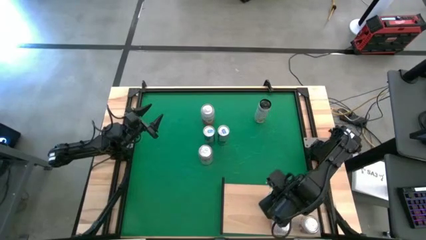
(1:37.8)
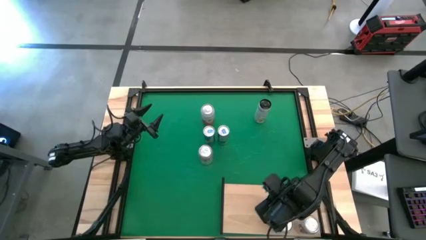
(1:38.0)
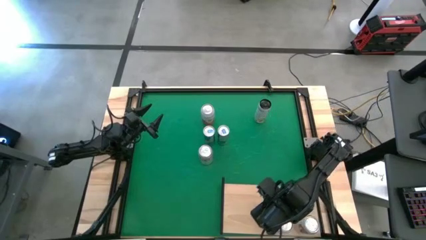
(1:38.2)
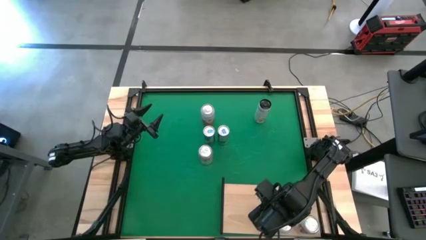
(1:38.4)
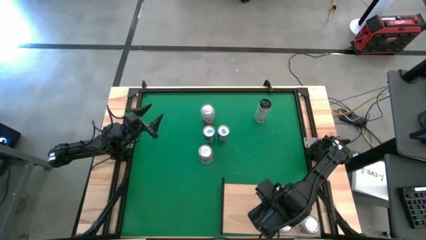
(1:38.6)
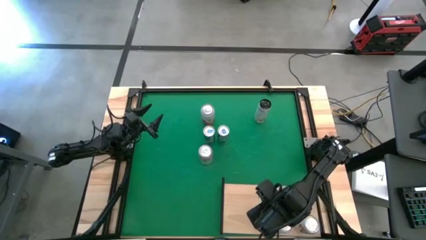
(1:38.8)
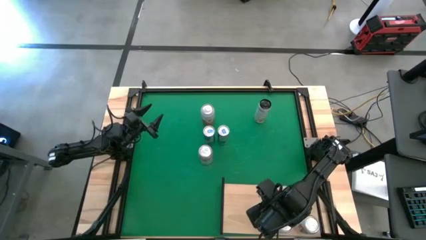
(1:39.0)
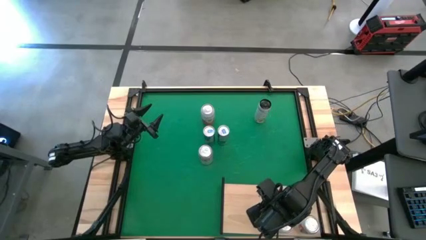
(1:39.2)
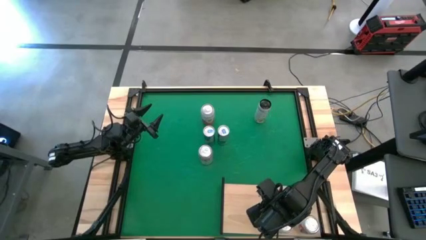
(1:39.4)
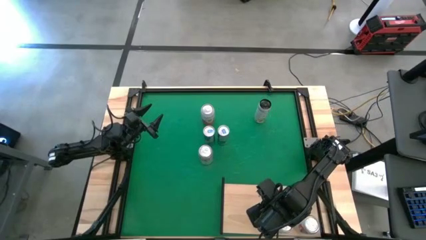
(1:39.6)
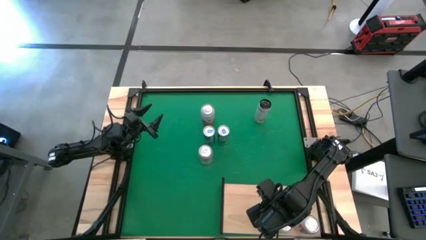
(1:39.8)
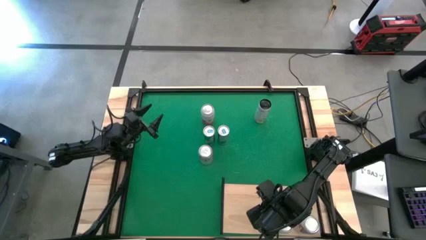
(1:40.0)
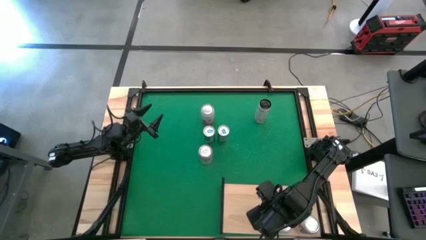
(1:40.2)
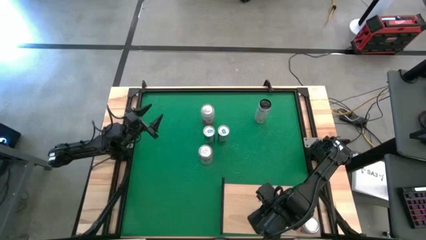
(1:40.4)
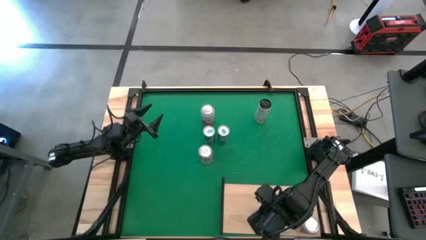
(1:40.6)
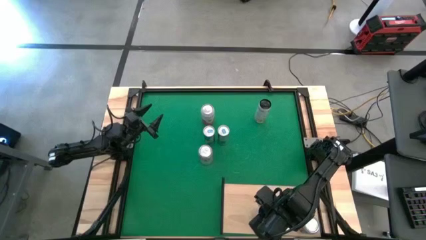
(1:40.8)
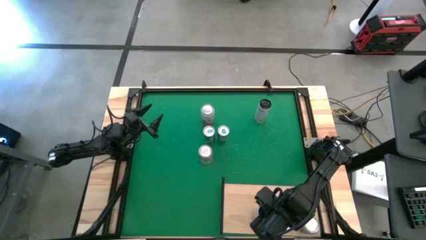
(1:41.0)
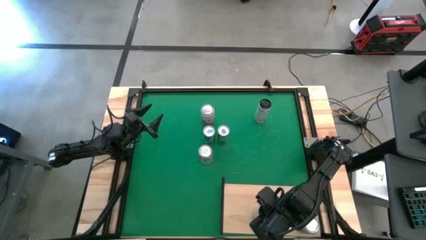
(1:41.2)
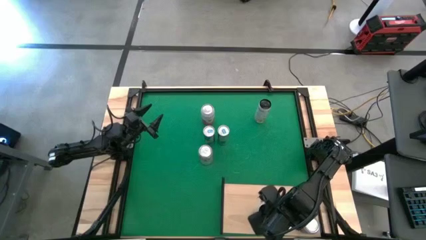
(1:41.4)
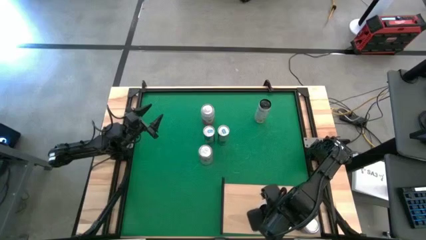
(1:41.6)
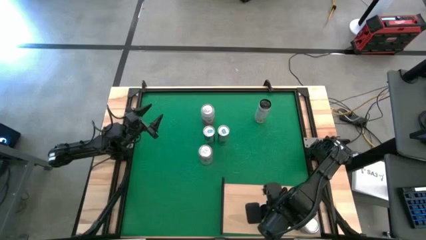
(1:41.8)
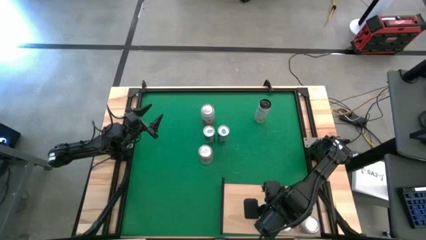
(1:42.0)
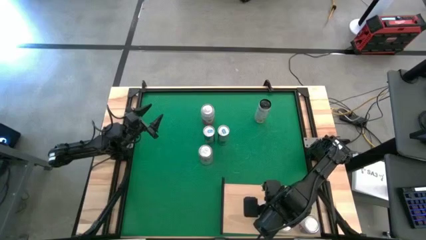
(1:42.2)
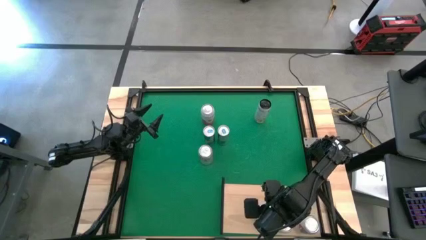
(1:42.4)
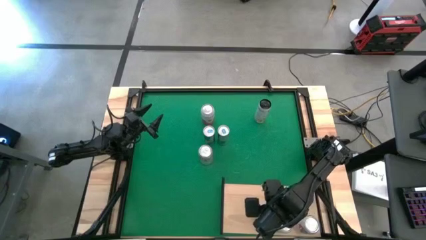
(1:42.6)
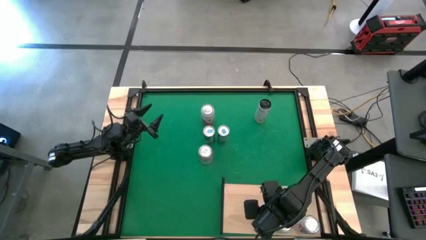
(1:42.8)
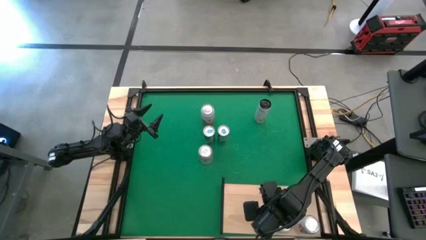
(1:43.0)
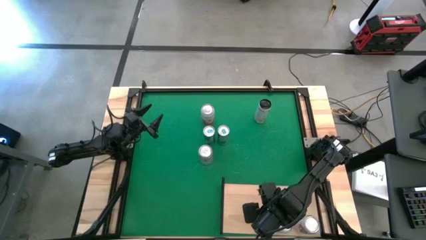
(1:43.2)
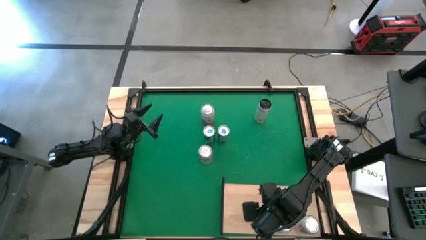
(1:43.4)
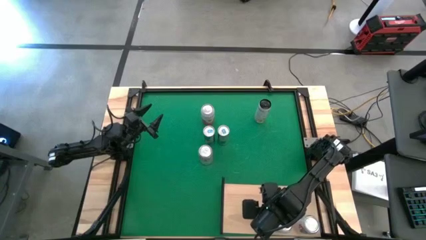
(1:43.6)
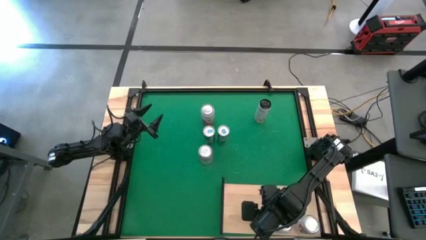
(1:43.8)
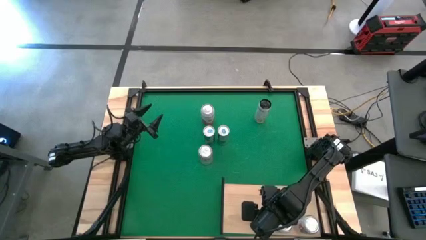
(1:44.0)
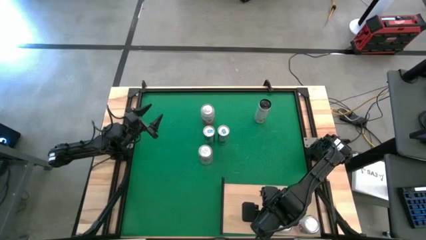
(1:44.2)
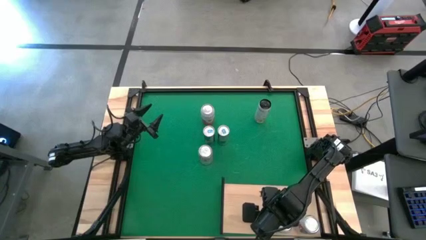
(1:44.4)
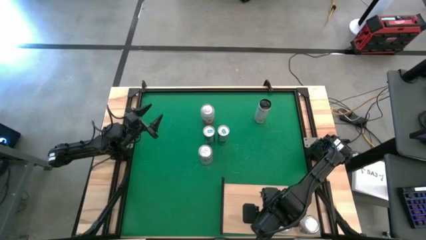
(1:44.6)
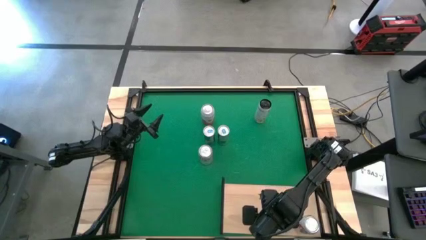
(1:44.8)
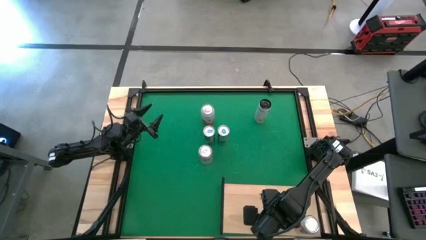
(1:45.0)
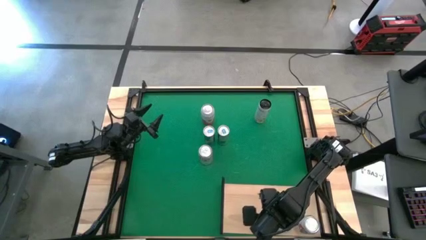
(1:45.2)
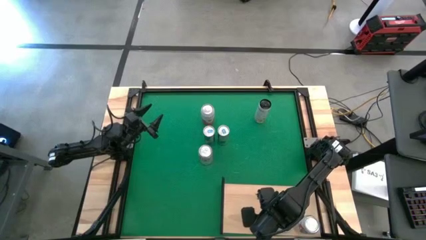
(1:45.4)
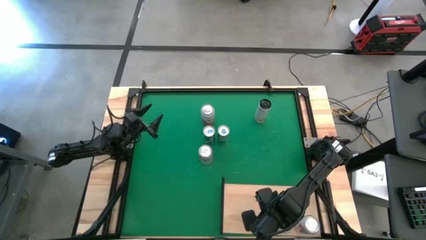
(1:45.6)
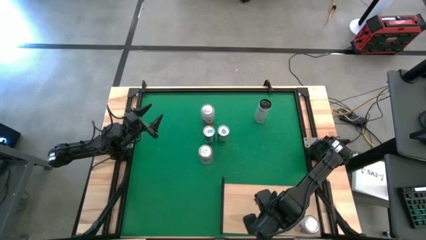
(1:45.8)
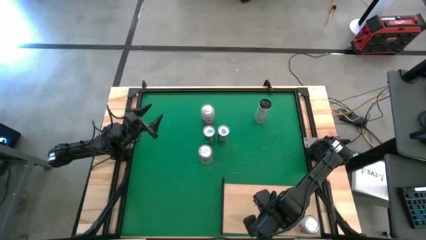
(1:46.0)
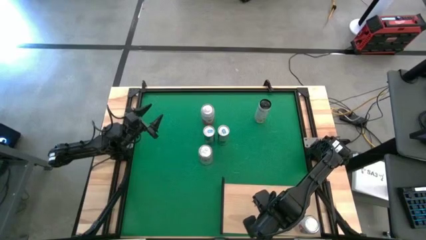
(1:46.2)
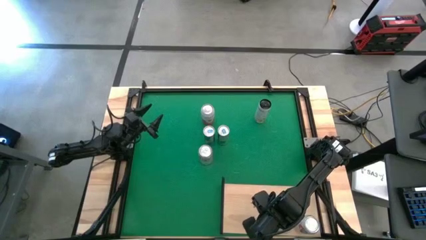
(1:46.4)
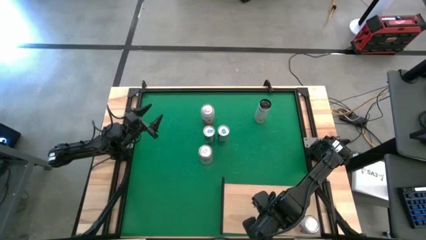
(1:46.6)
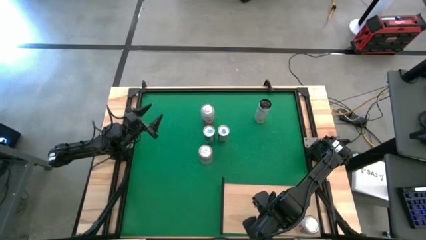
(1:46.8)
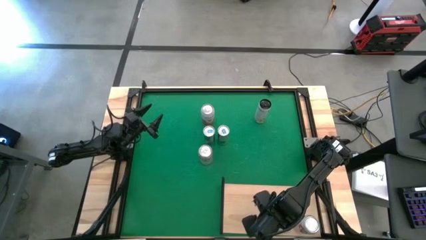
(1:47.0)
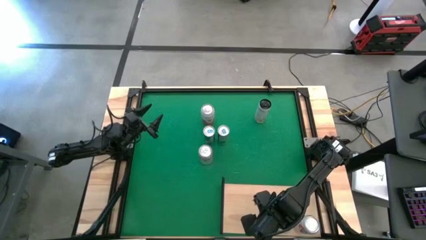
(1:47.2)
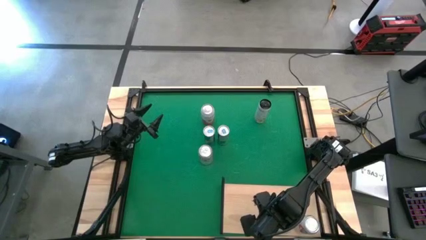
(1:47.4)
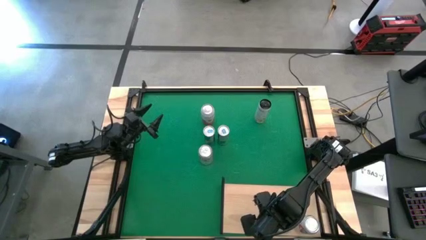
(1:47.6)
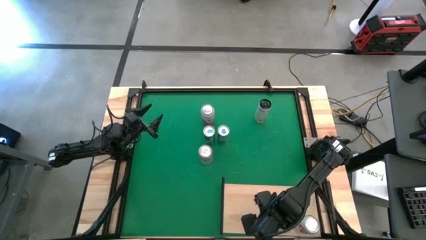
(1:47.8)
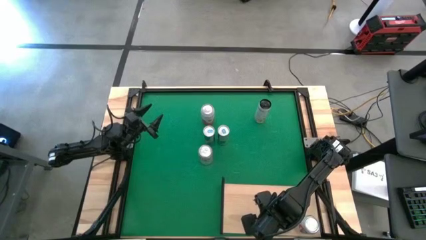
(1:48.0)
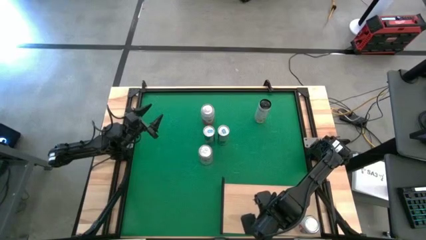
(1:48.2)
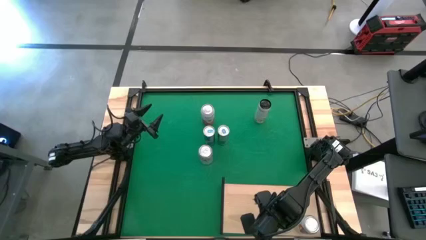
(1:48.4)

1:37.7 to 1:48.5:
Task: Place canned beverage on shelf
Put the right white-yellow soda can on the shelf

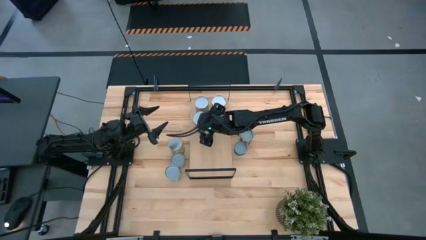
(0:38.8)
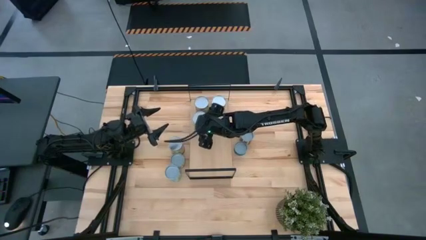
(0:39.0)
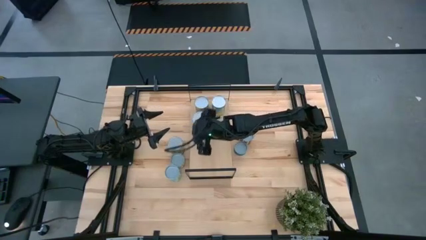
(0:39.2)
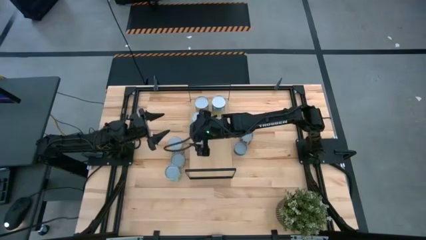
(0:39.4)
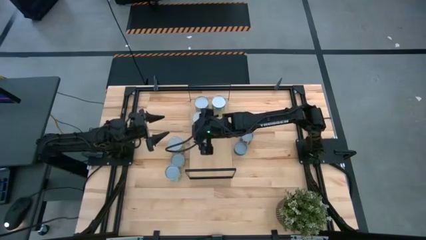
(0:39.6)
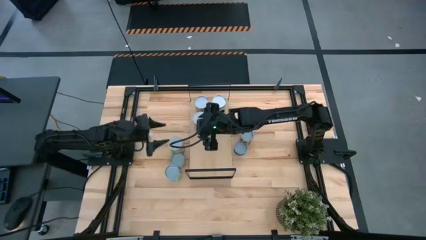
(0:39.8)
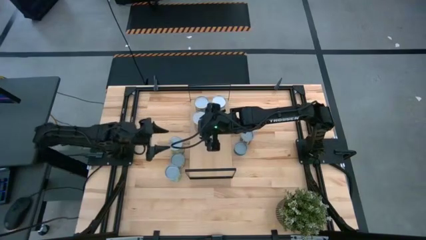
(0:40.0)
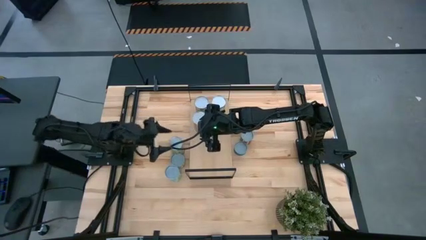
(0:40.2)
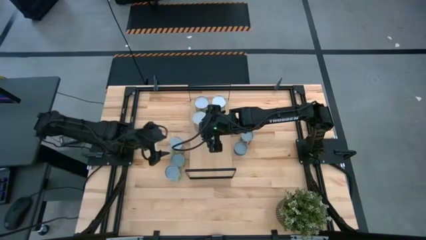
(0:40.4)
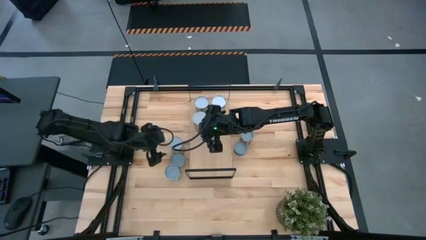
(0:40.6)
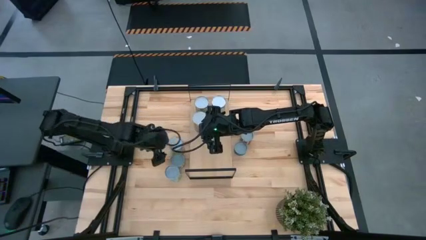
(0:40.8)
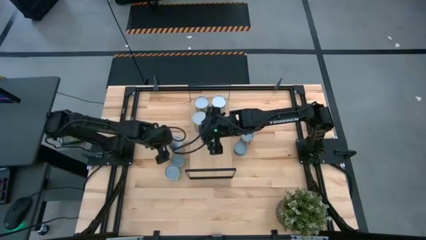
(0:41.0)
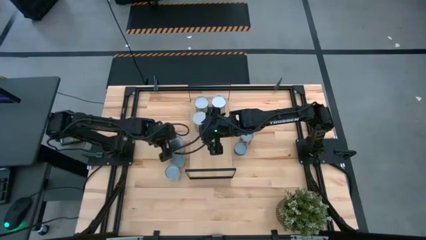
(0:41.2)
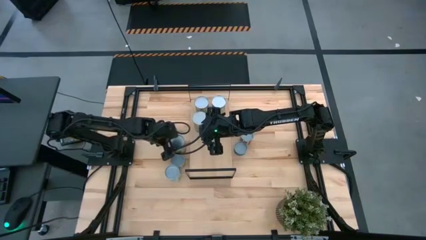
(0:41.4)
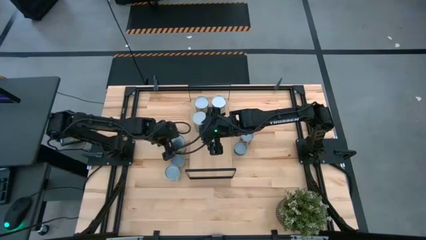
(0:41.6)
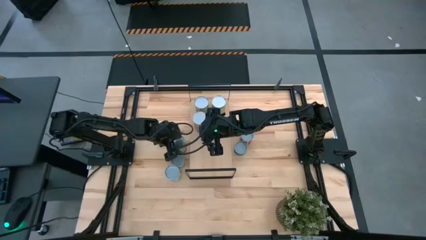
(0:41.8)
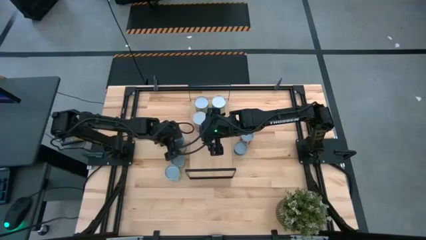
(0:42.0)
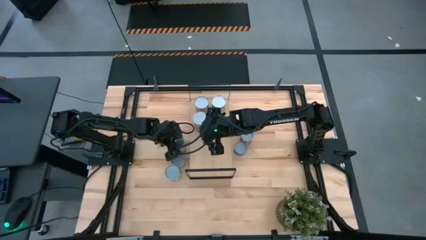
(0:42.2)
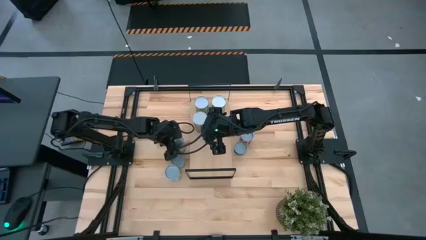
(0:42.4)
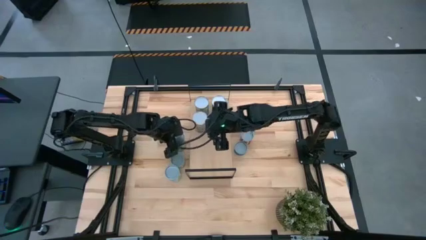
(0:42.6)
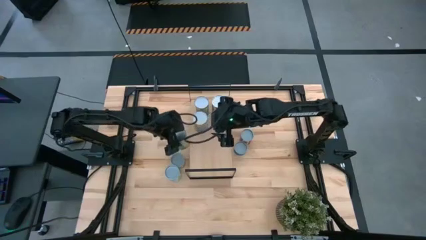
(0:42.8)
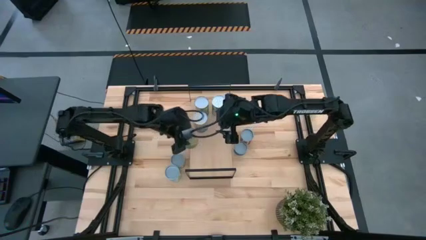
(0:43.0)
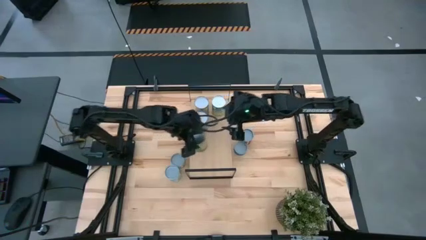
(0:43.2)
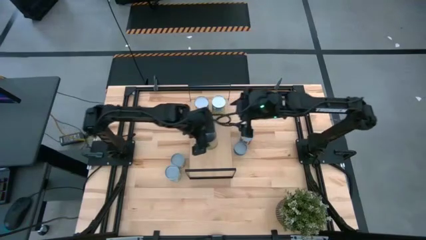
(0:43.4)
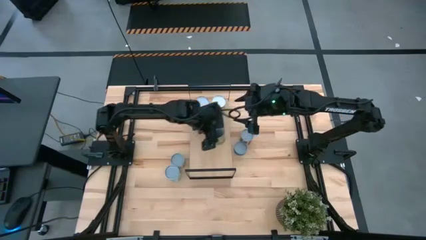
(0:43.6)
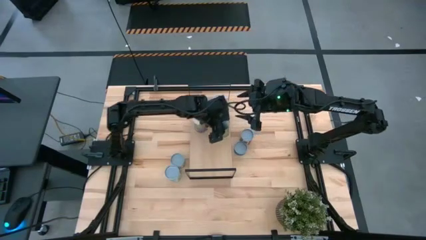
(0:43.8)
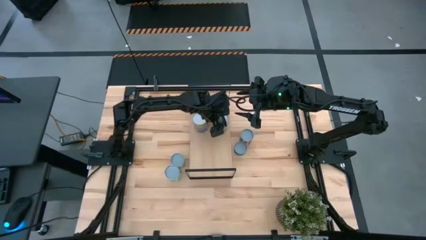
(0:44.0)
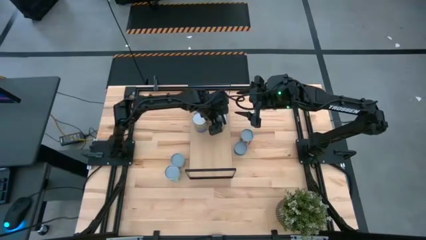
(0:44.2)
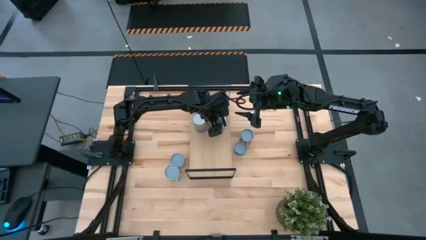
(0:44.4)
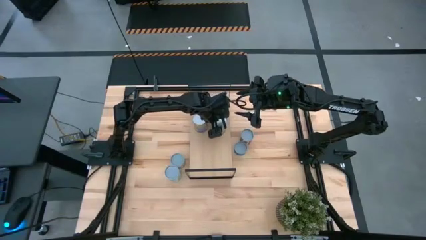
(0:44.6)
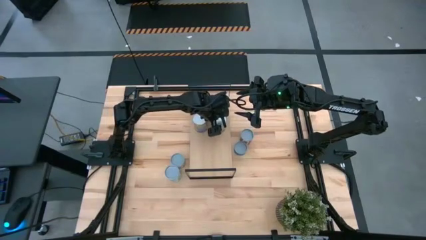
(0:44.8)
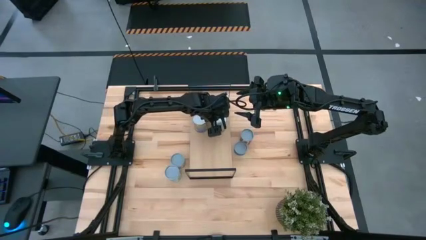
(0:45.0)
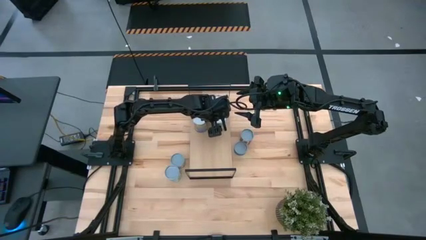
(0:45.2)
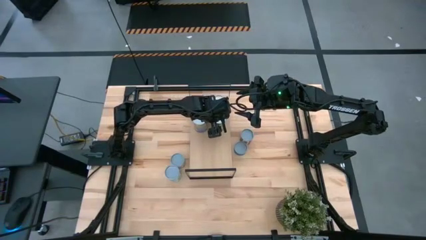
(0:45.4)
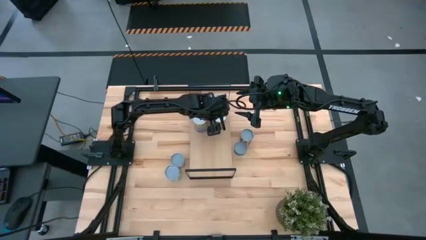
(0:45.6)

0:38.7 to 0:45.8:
Task: Pick and place cans onto a shelf
Put the canned oranges onto the shelf

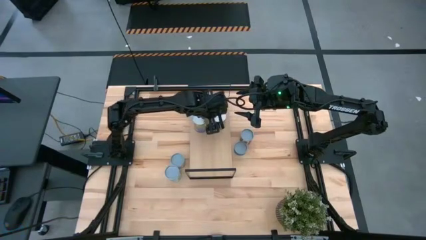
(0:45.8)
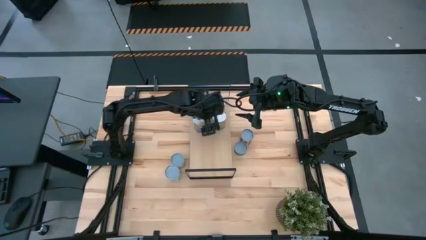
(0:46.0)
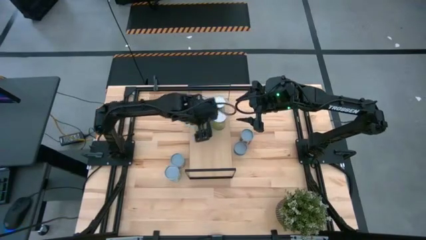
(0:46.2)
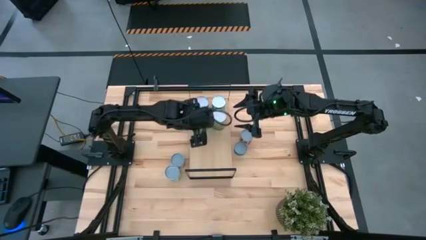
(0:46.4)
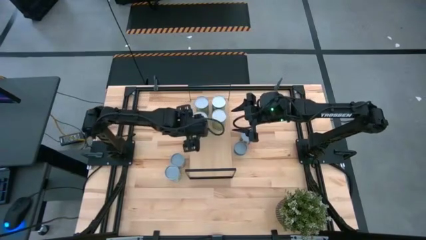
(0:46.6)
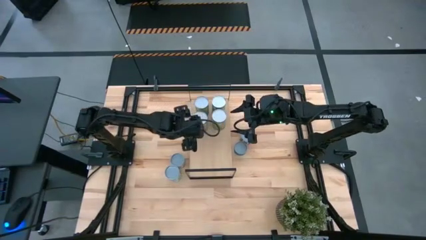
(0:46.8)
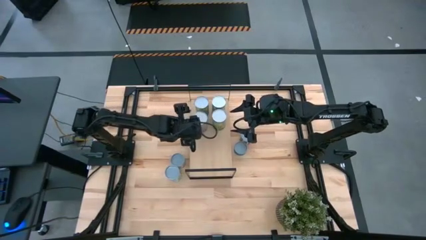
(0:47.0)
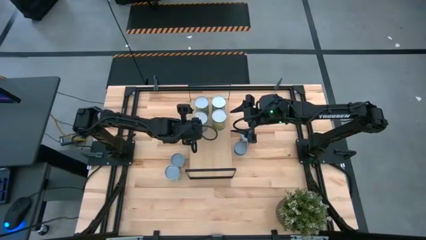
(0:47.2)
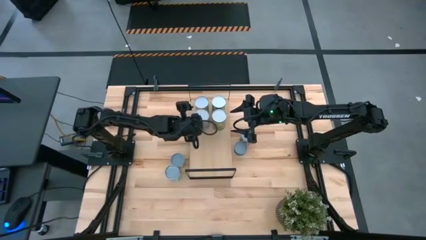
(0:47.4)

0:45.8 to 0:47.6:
Adjust the canned carrot on the shelf
